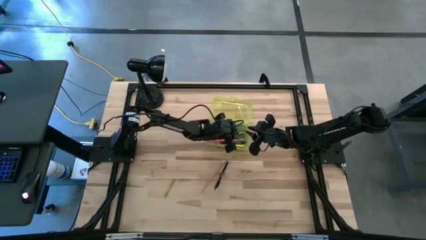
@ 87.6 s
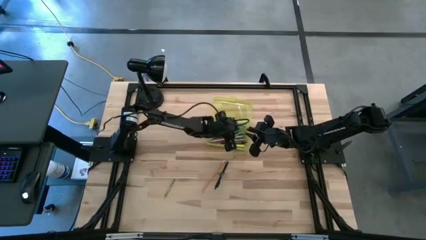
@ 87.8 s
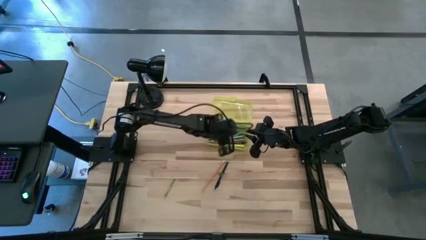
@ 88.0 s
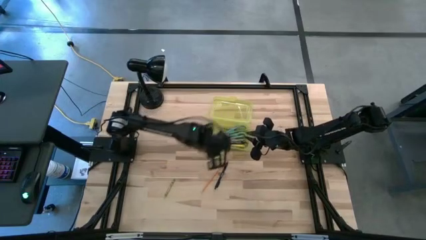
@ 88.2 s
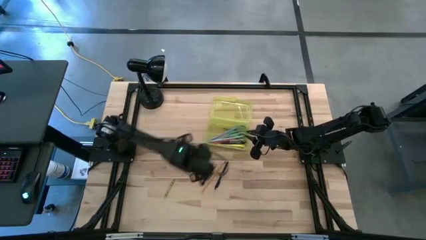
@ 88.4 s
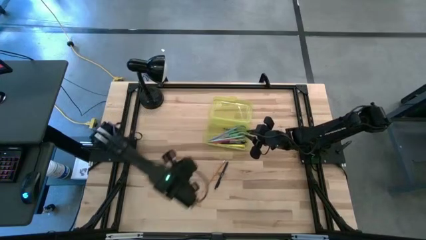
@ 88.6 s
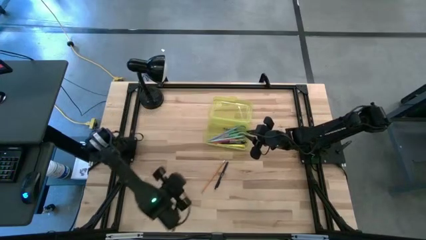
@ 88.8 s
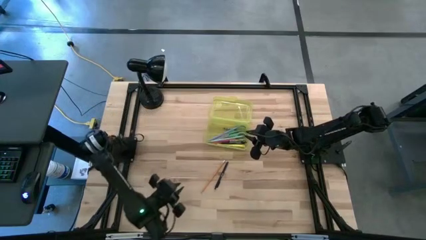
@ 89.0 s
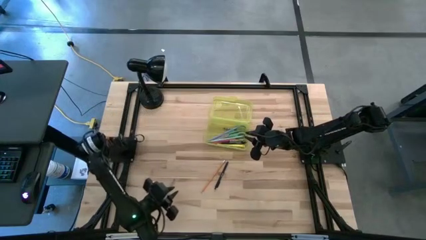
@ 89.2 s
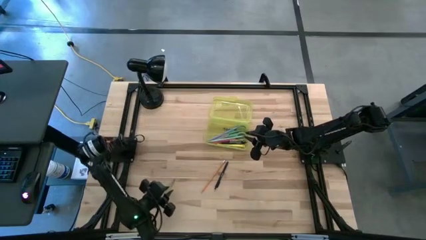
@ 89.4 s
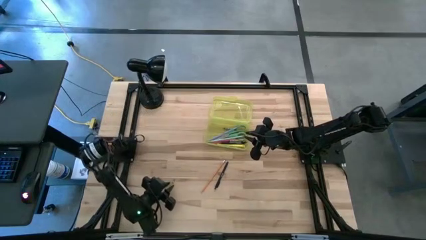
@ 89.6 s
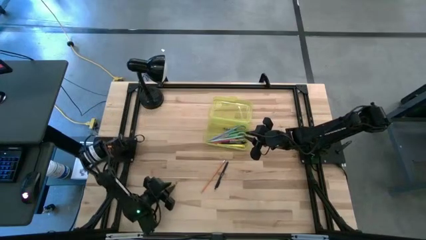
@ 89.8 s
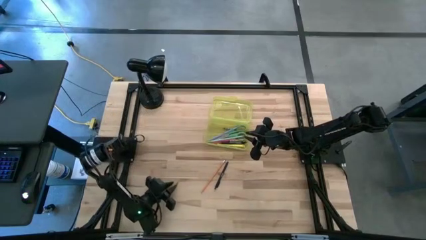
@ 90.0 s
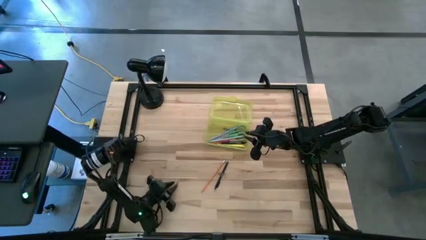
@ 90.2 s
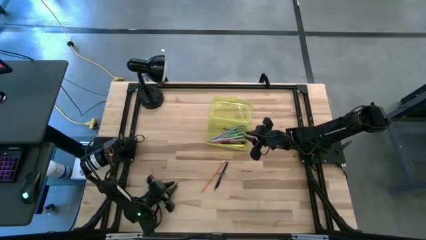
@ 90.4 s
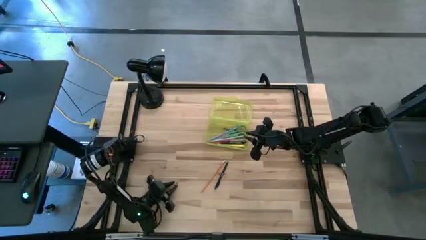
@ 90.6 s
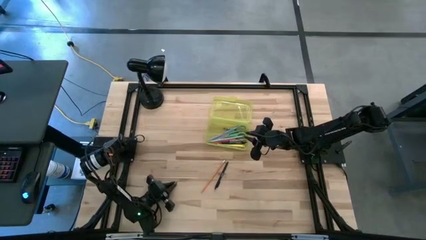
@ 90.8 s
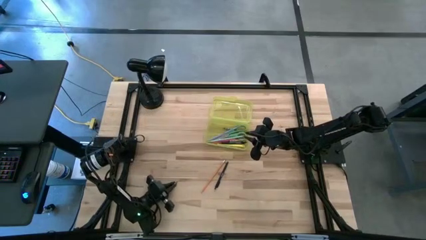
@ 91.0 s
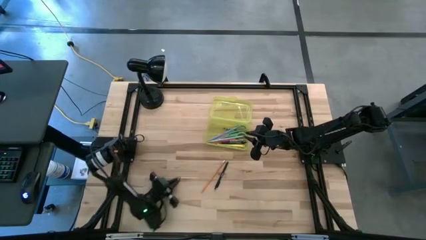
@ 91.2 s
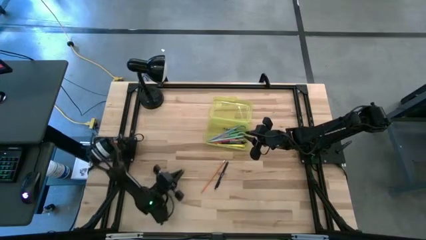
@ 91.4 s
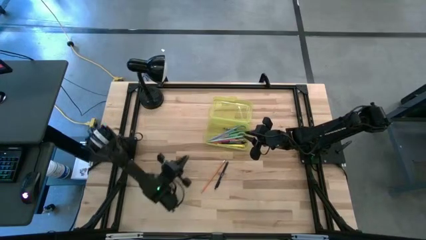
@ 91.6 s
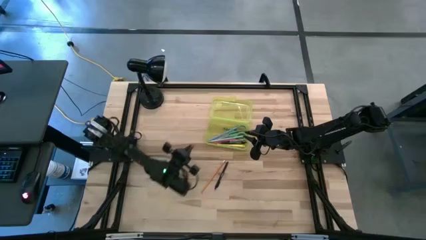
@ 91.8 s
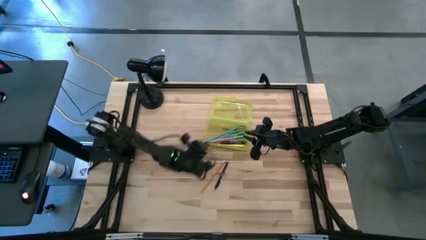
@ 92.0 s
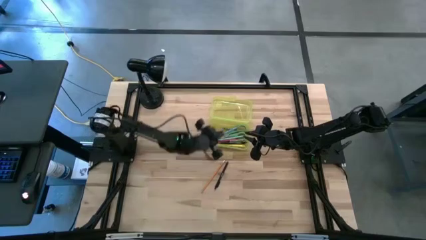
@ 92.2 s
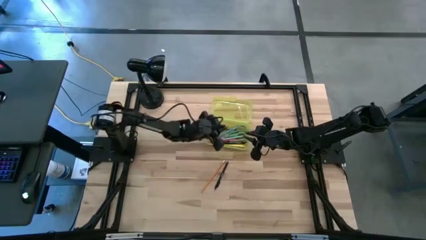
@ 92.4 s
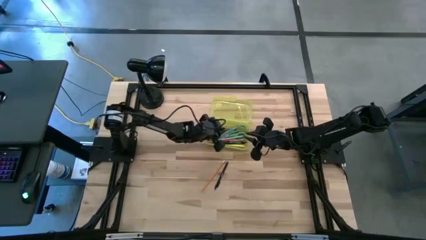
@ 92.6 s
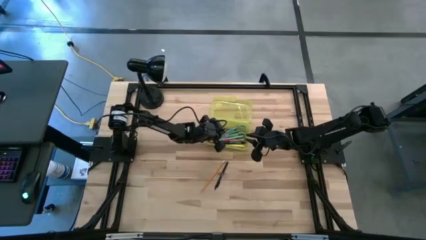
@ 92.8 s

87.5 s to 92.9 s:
Task: Pick & place school supplies into a supply box
Put the light green crayon into the yellow supply box

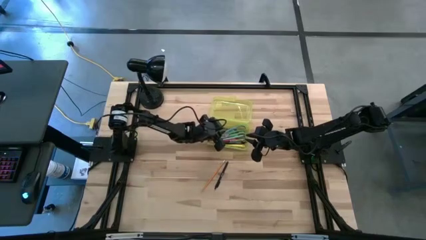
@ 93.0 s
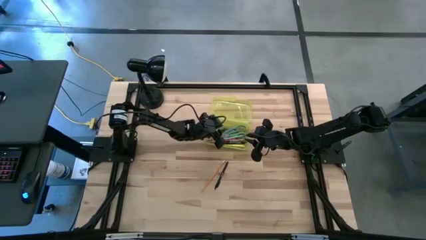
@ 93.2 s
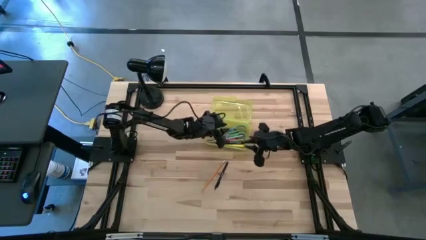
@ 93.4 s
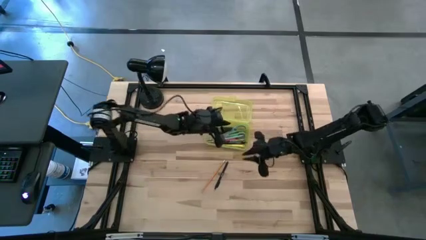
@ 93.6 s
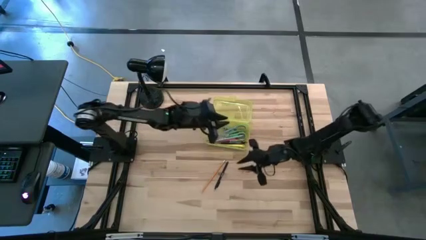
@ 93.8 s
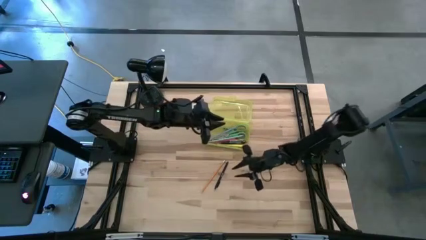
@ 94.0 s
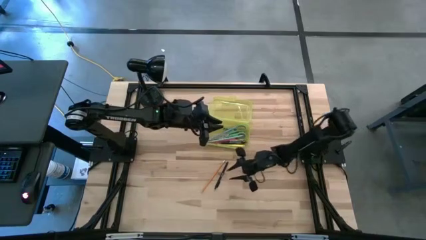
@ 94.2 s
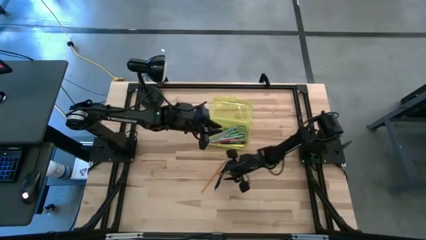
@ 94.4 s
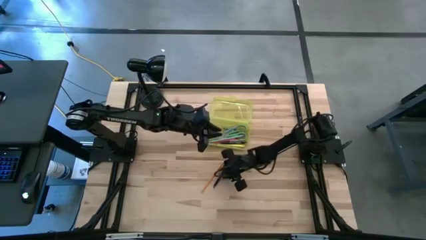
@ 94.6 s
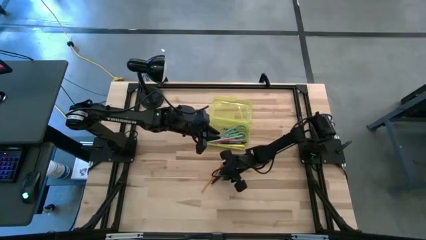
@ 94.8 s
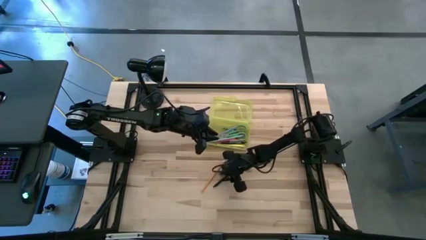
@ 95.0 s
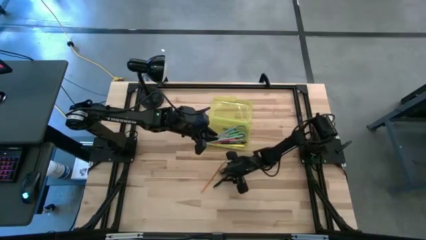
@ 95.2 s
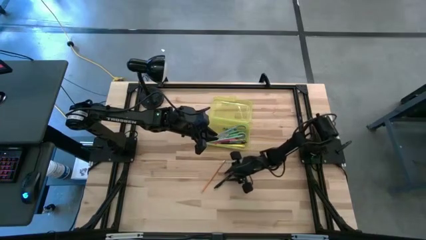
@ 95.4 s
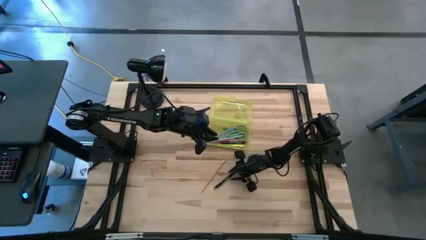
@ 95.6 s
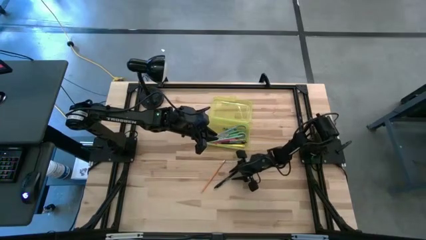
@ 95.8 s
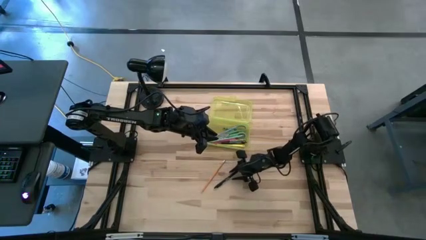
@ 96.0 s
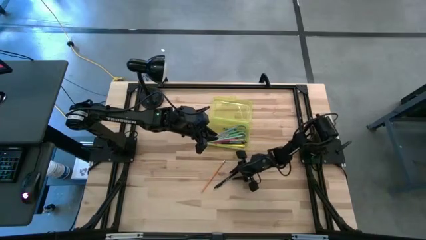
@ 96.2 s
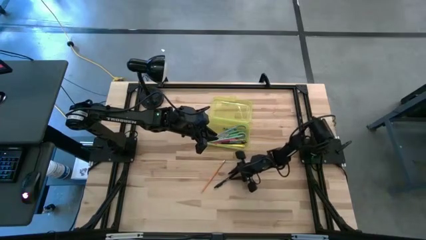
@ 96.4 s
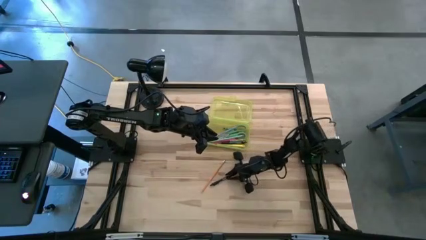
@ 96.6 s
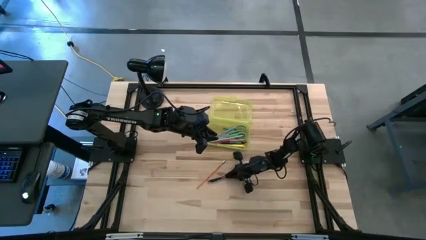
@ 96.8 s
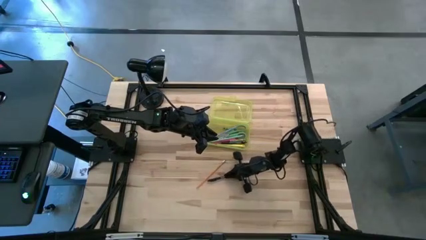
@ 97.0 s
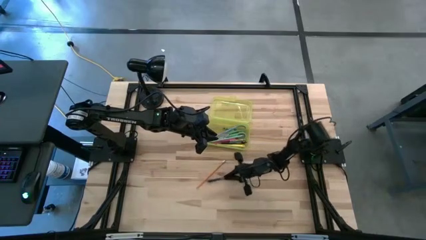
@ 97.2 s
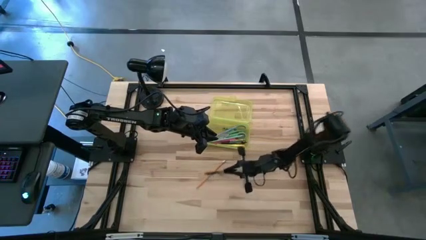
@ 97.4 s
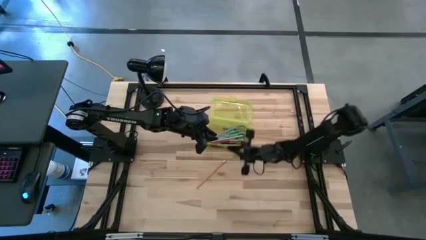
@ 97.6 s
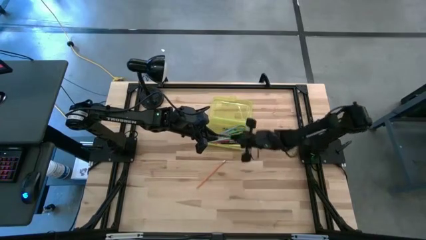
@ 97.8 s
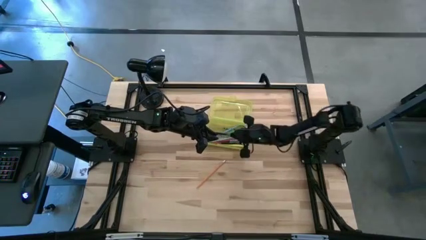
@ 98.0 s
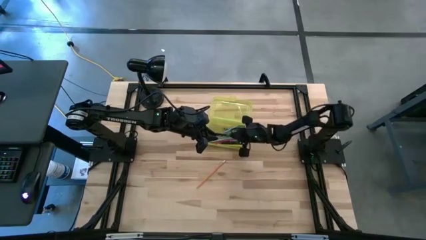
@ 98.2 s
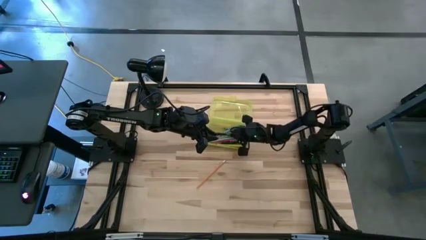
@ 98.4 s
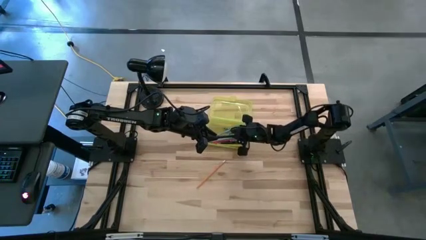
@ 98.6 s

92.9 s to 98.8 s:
Put the black pen into the yellow supply box

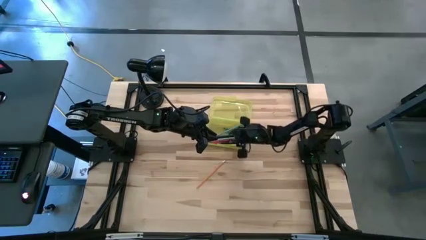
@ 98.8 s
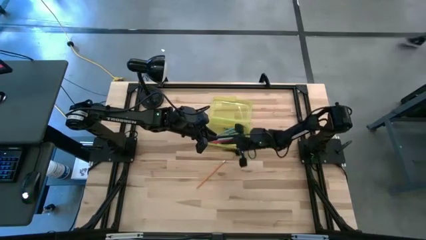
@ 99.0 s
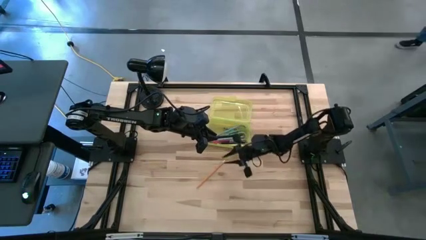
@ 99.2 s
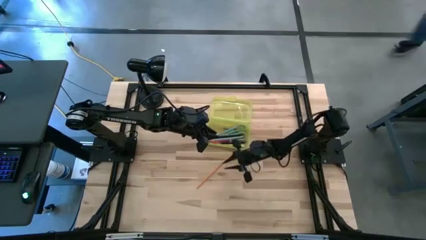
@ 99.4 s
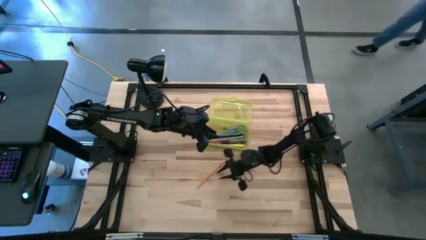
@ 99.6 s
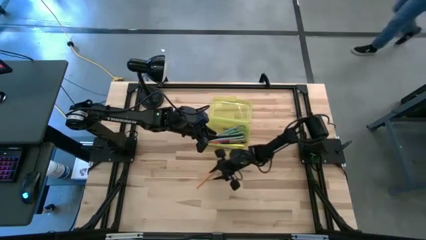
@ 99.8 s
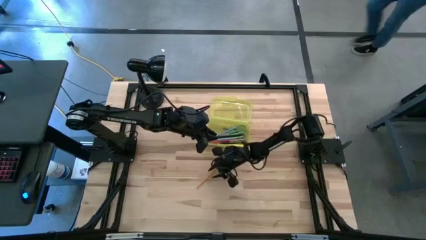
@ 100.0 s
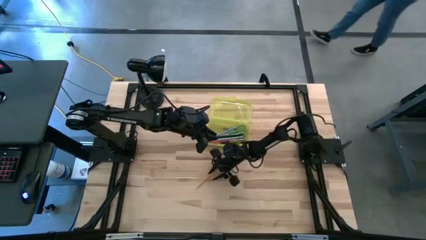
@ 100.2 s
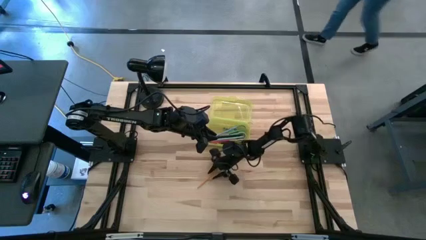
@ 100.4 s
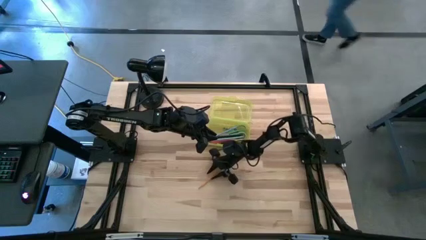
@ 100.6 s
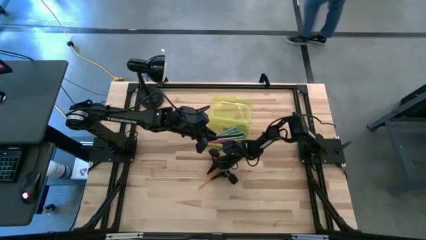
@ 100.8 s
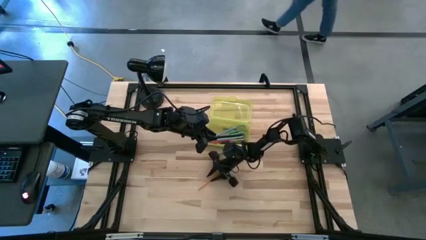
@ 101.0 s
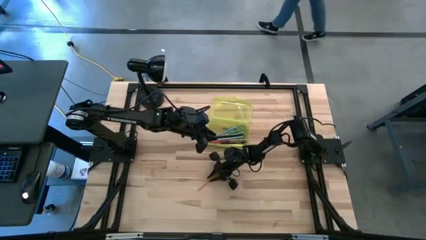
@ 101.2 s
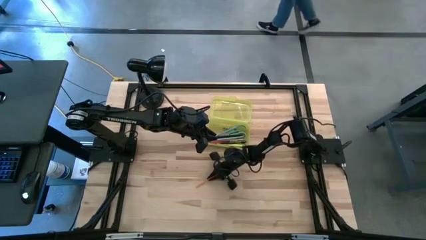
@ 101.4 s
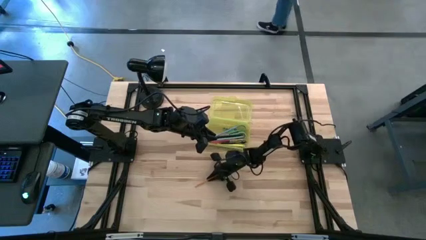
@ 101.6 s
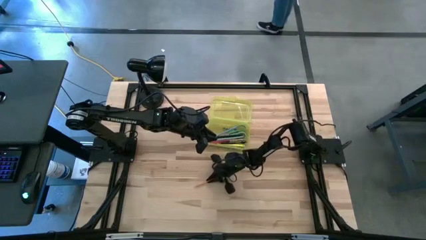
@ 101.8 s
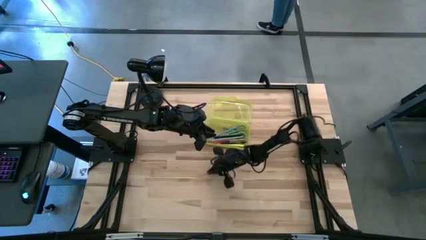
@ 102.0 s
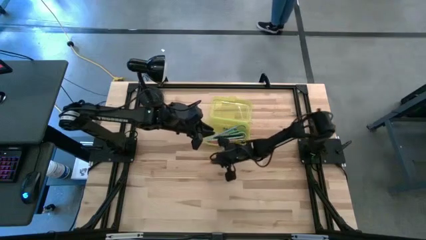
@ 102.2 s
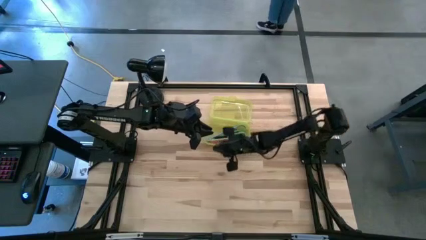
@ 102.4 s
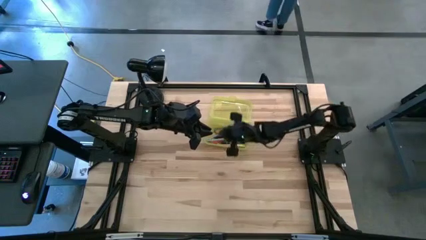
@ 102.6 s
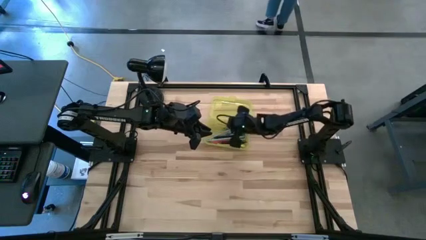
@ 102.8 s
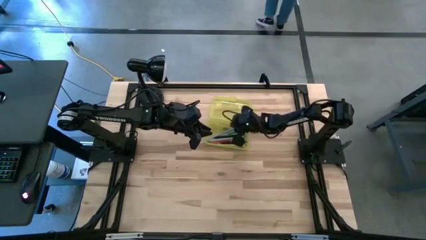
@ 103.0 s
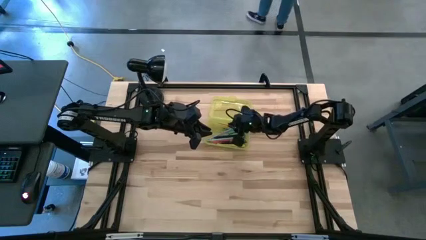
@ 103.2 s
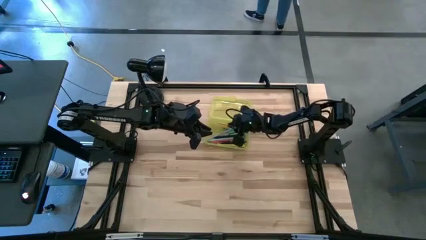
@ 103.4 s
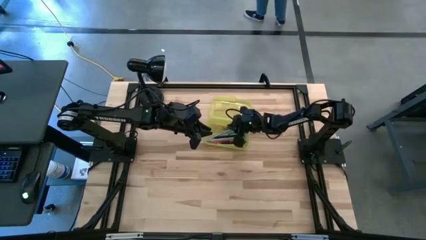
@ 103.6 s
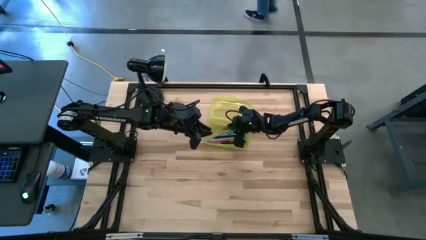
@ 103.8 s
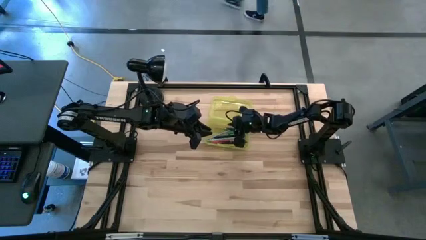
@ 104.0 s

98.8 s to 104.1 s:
Put the orange pencil into the yellow supply box
